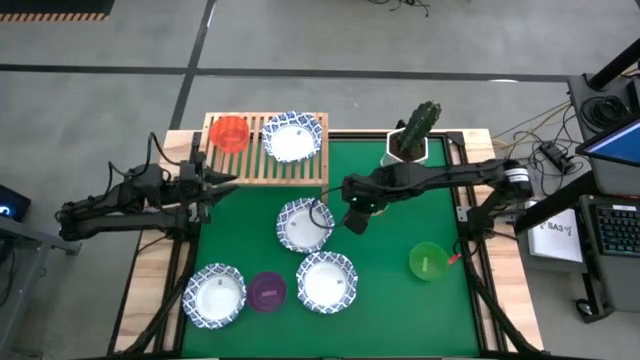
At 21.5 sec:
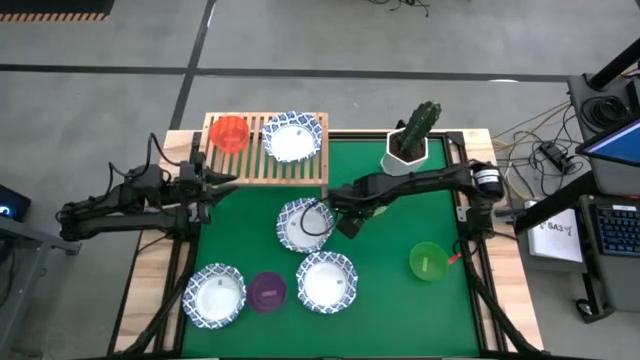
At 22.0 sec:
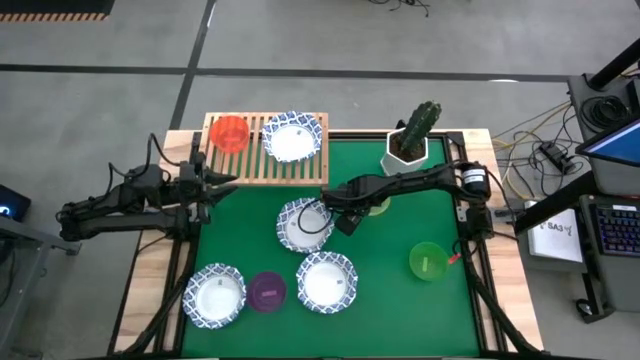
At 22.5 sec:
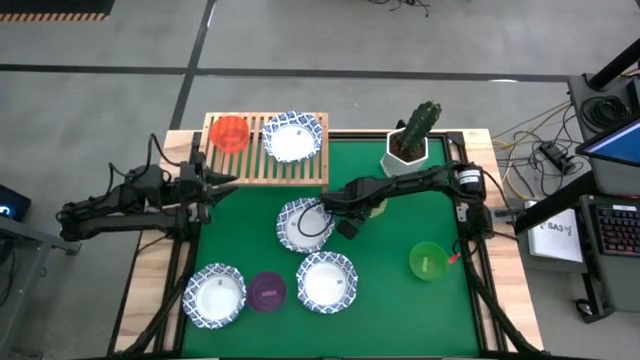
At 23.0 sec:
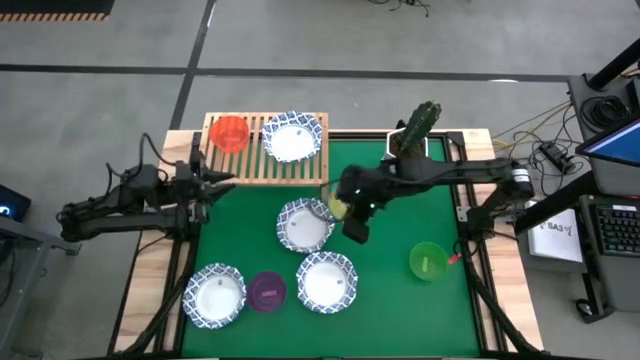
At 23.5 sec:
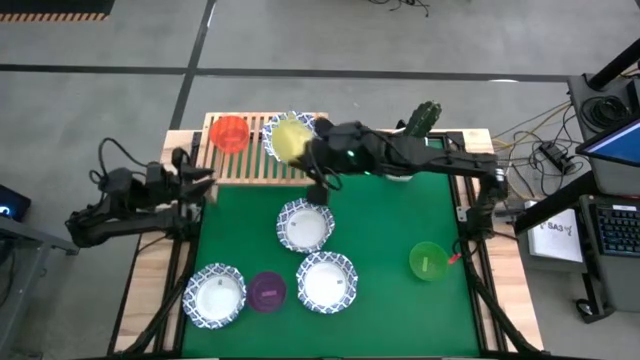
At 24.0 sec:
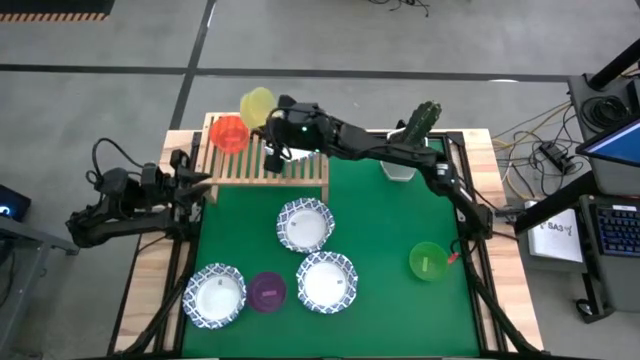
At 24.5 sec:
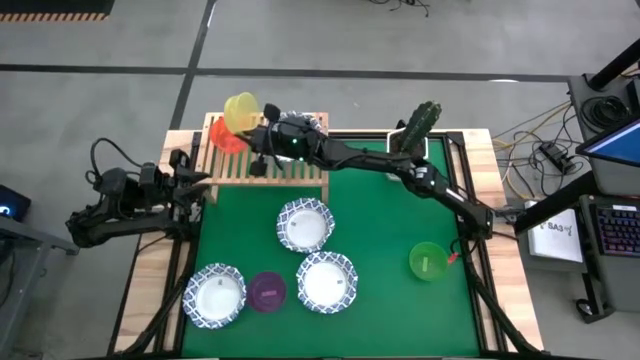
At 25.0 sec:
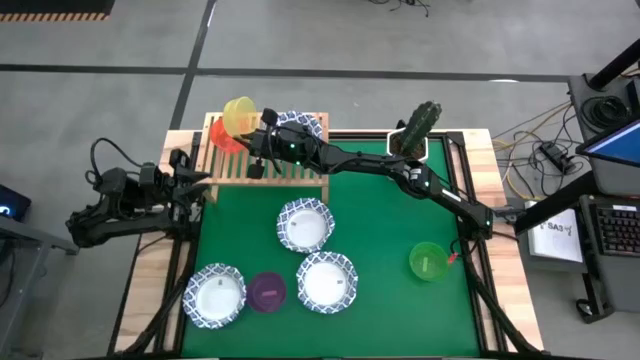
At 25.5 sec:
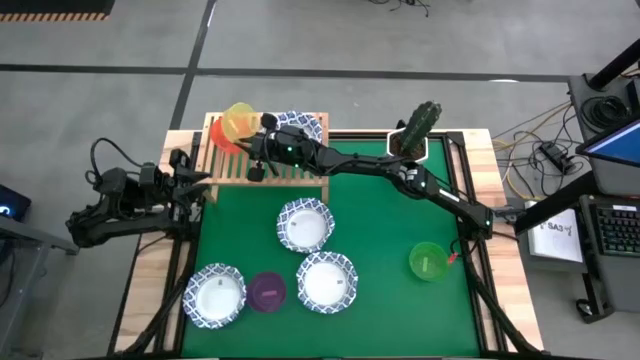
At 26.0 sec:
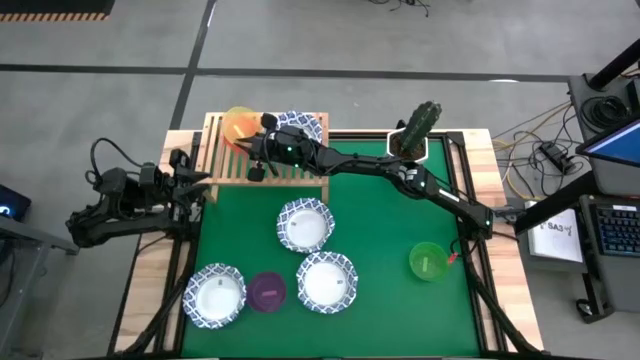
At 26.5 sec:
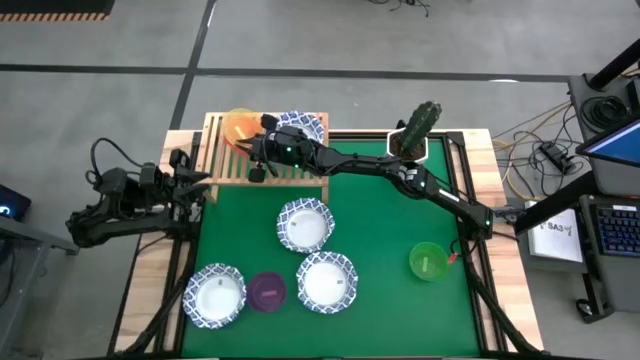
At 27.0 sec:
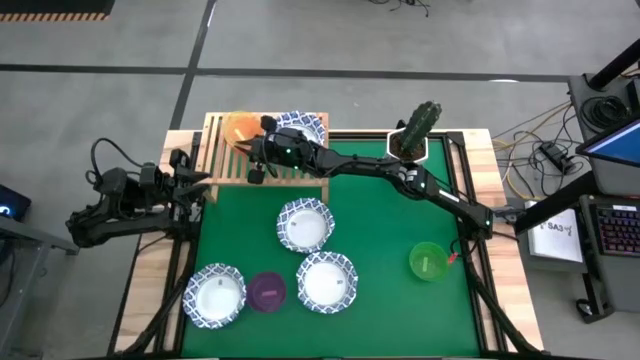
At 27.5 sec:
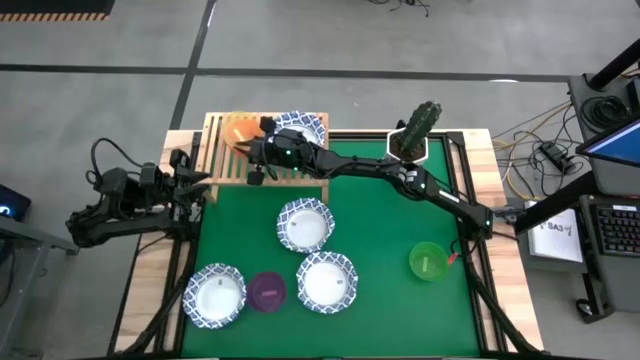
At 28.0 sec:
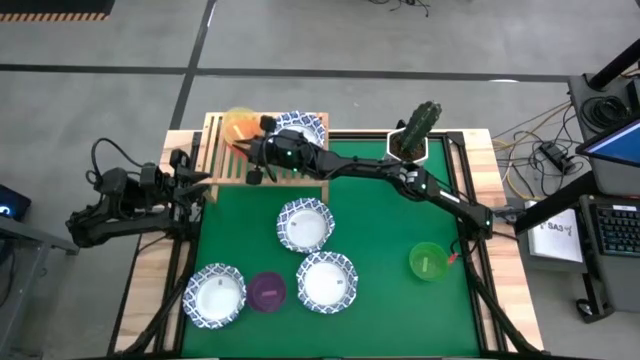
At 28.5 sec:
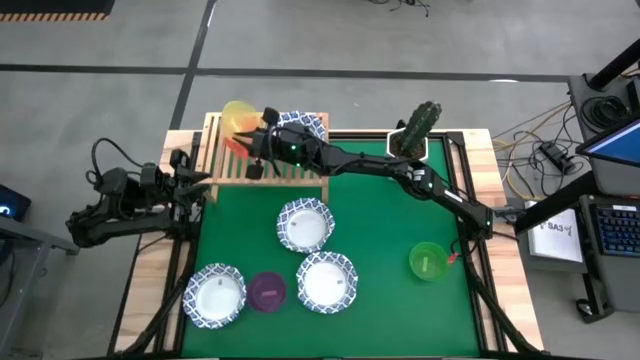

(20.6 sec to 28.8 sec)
Task: Place and stack plates onto a shelf
Stack the yellow bowl on top of the orange bowl on the shelf

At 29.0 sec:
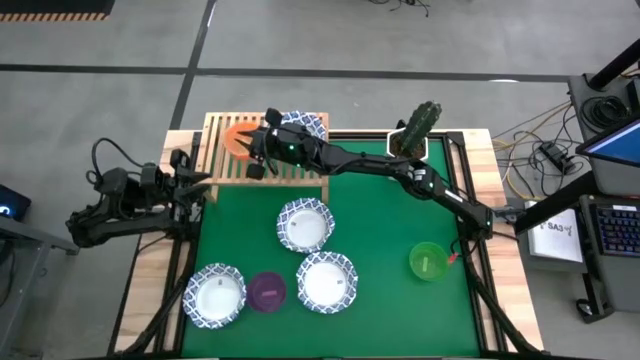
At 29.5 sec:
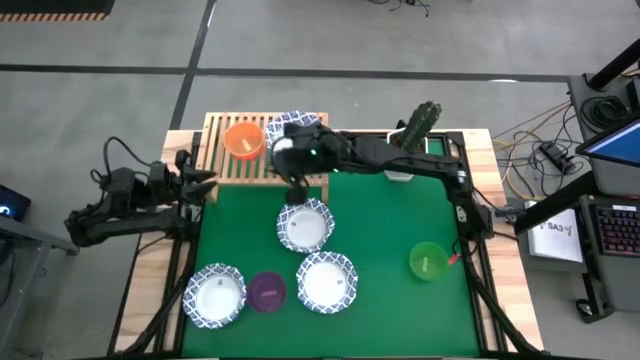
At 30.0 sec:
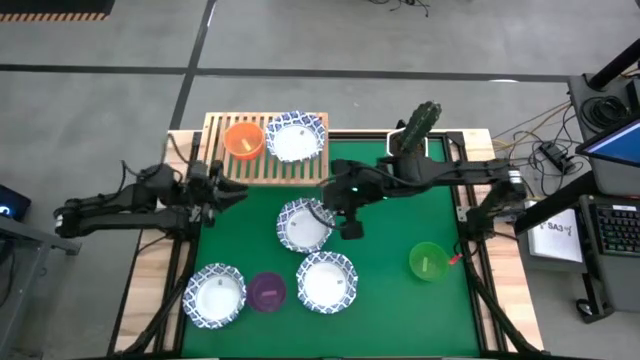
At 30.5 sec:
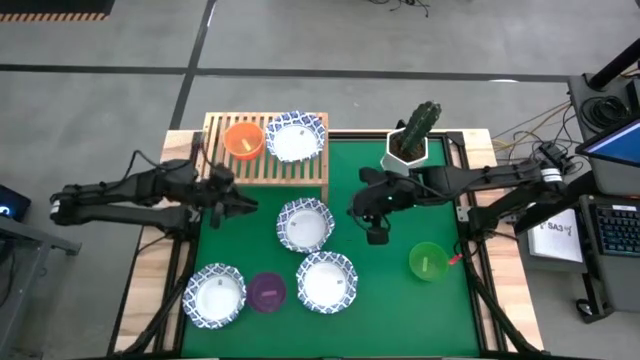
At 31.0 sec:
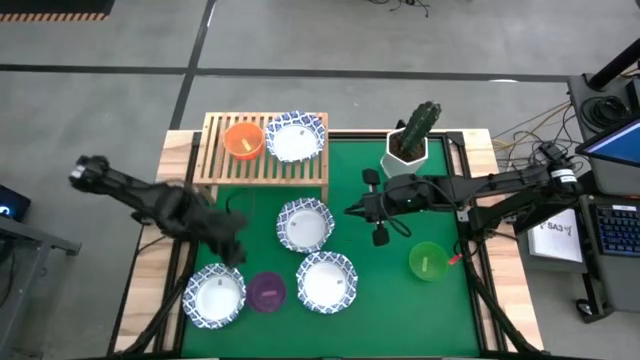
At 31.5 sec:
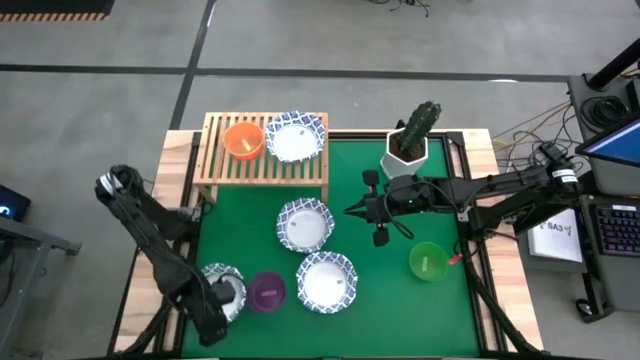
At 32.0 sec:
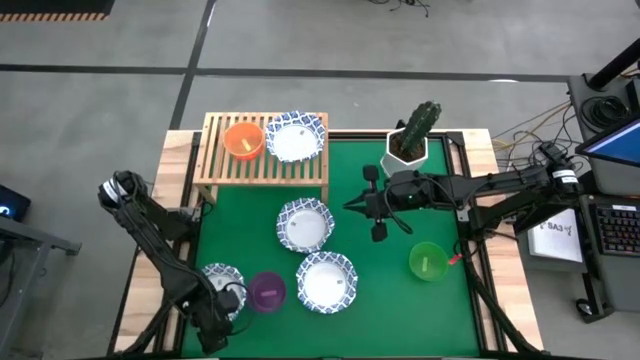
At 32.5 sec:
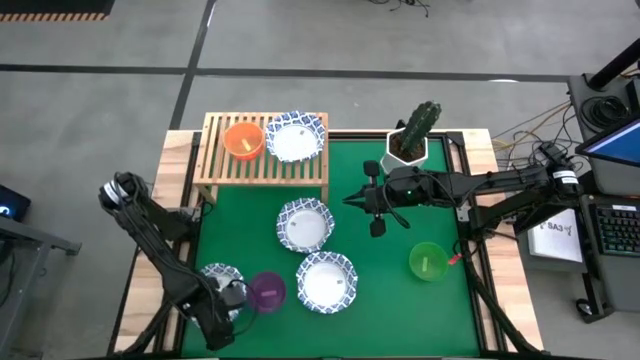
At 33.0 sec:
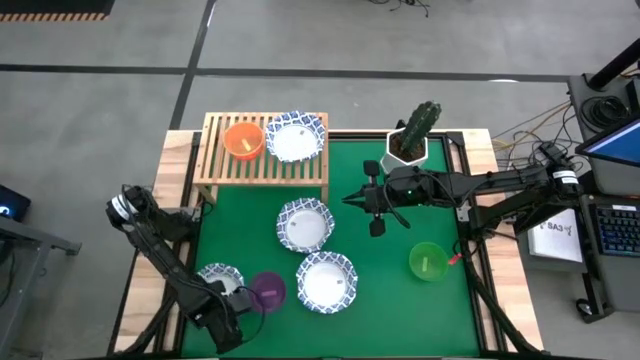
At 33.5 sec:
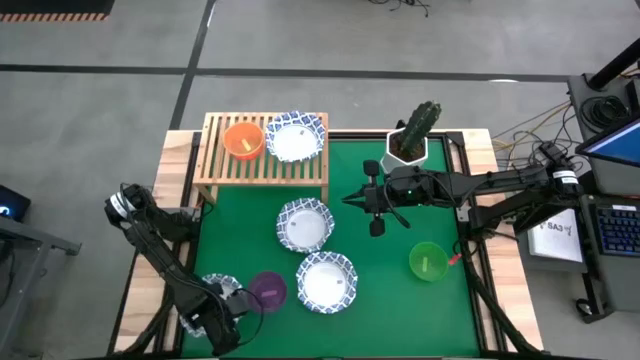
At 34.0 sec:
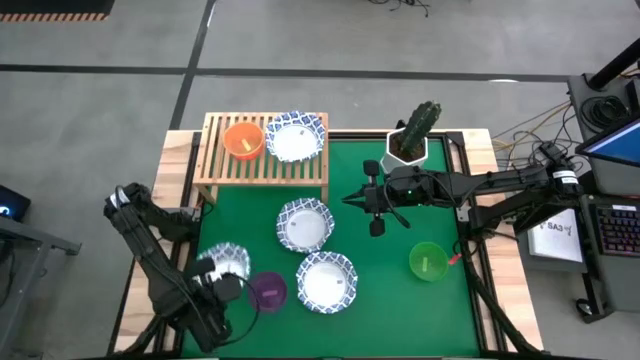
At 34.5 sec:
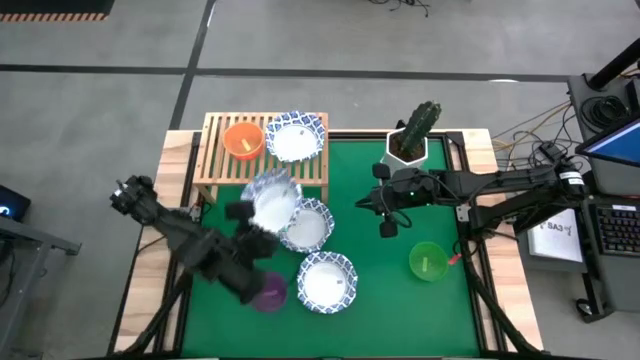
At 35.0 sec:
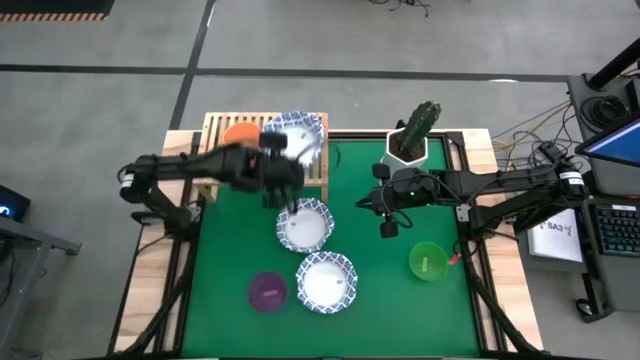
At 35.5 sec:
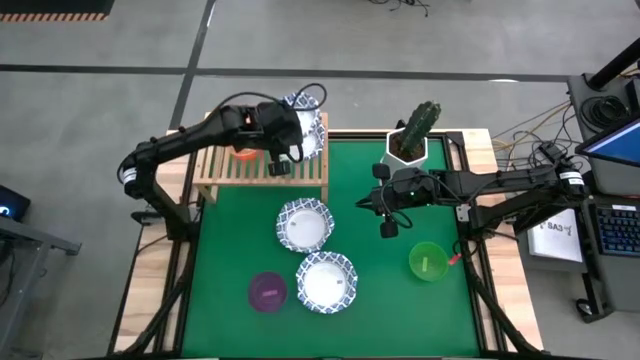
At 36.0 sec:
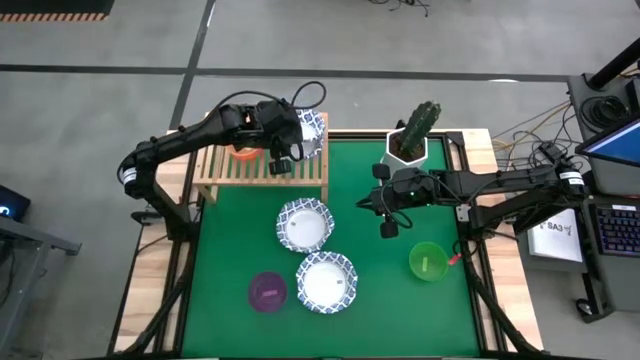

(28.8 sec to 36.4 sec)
Stack the bottom left white and blue plate on top of the white and blue plate on the shelf

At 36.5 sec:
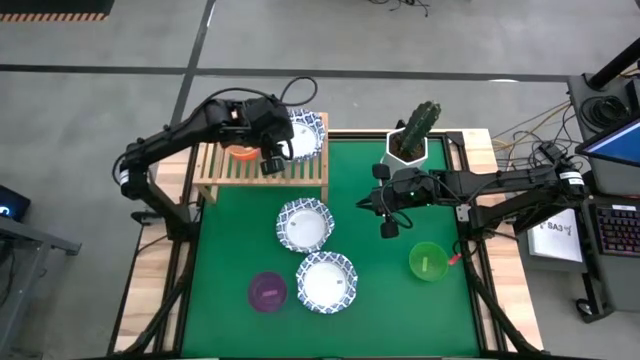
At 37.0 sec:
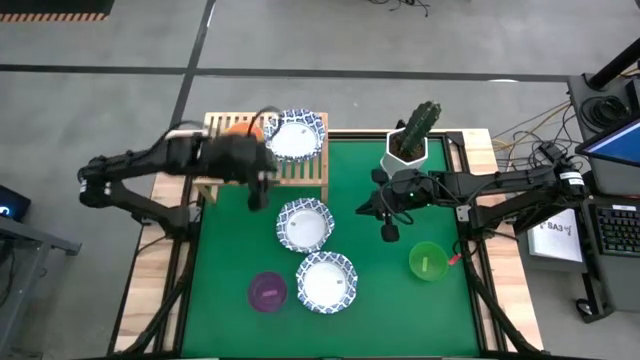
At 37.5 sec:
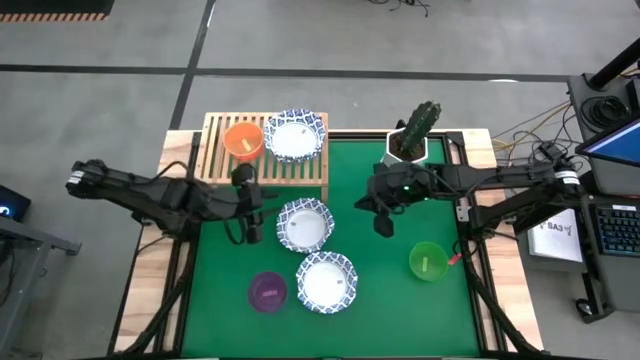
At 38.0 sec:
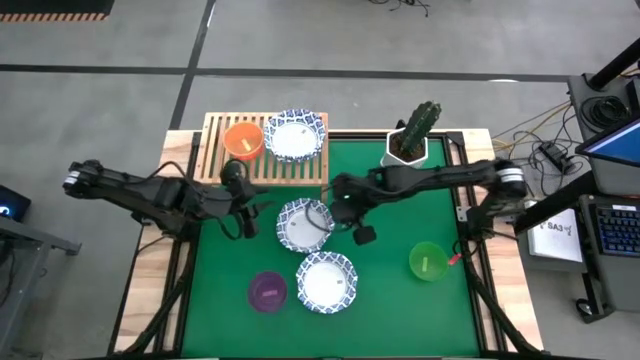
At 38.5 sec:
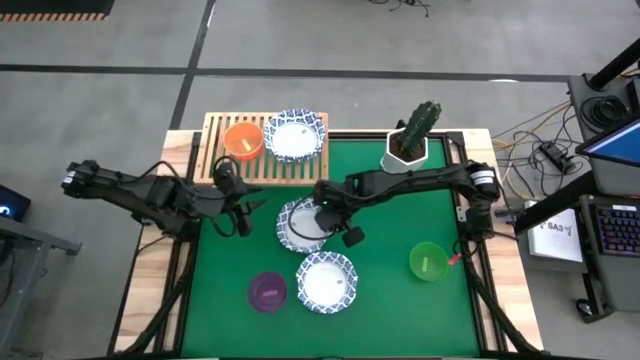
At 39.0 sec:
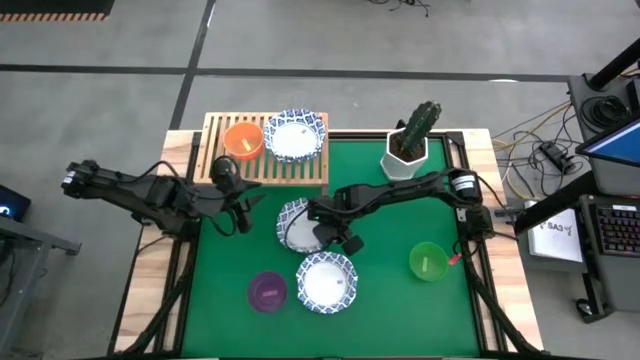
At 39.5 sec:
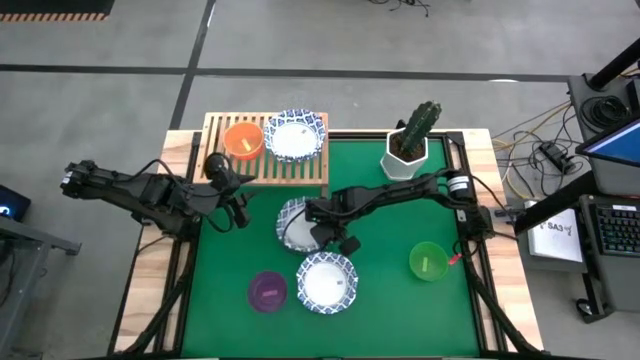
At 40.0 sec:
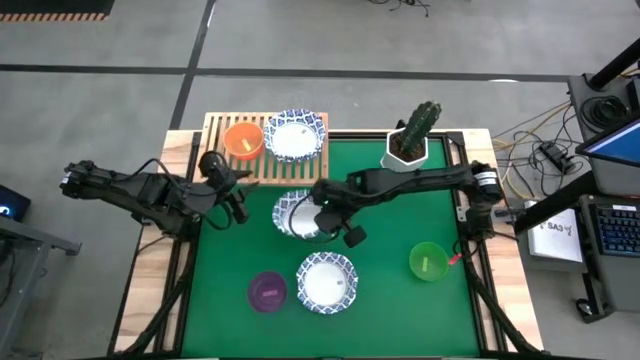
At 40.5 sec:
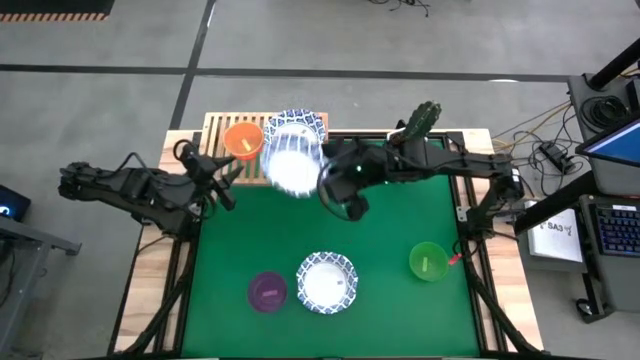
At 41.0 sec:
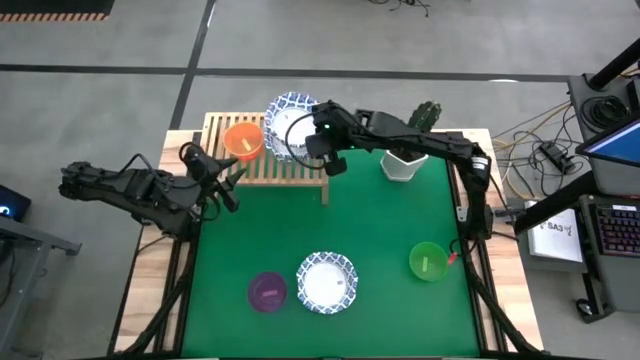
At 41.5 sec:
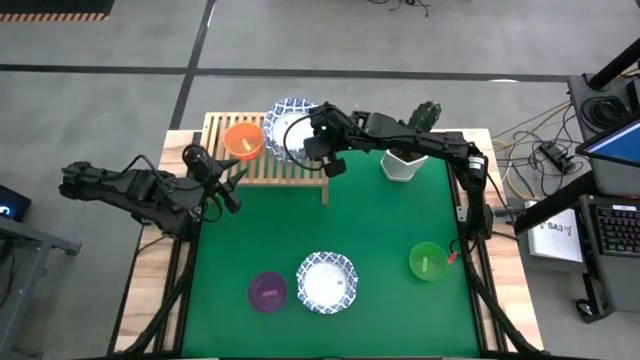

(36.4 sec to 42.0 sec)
Stack the top white and blue plate on top of the white and blue plates on the shelf
